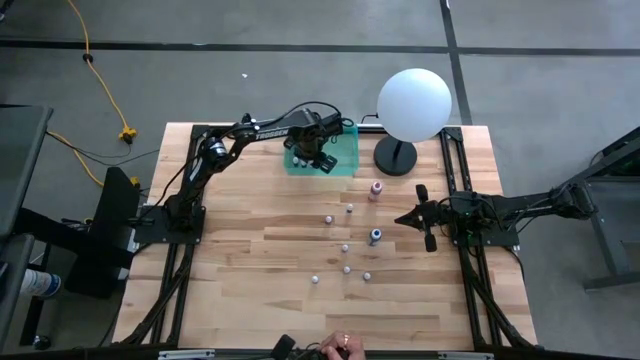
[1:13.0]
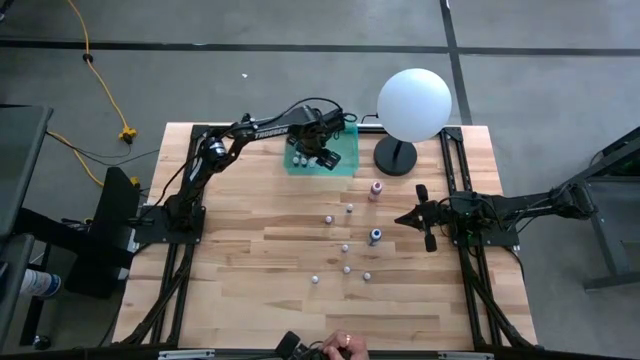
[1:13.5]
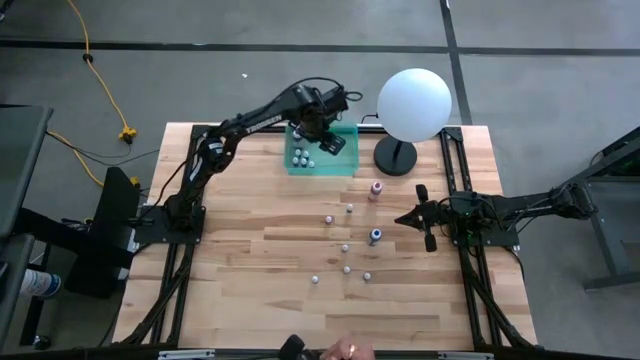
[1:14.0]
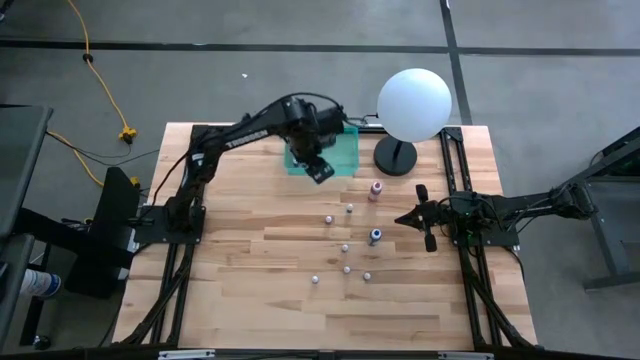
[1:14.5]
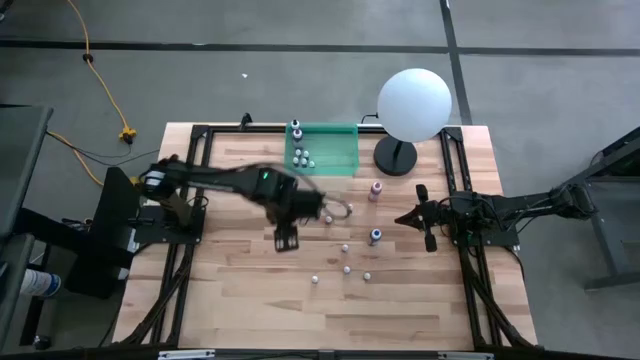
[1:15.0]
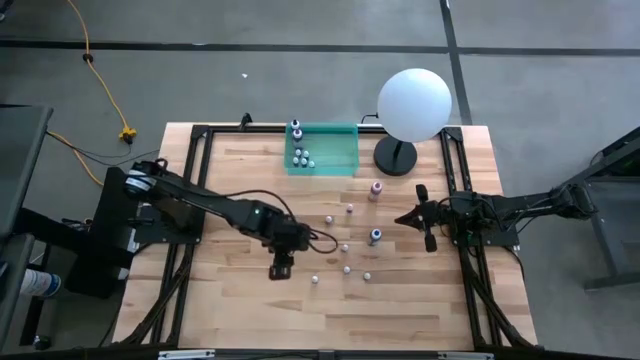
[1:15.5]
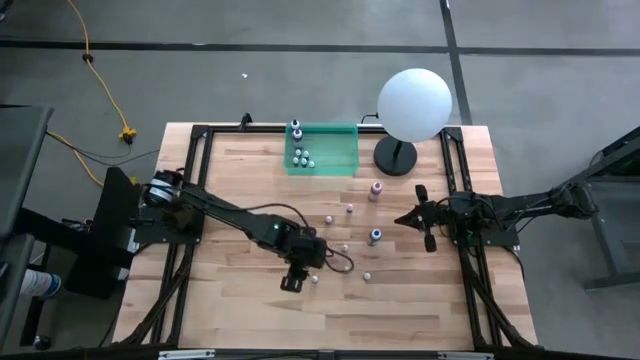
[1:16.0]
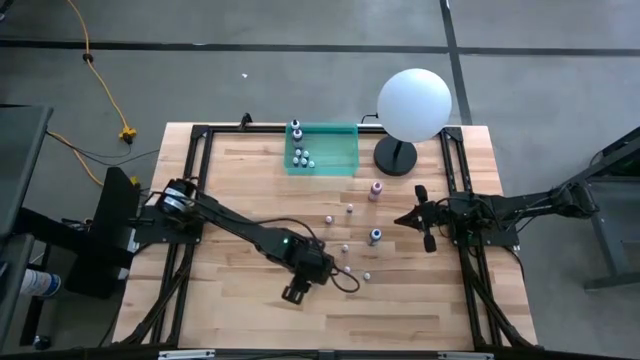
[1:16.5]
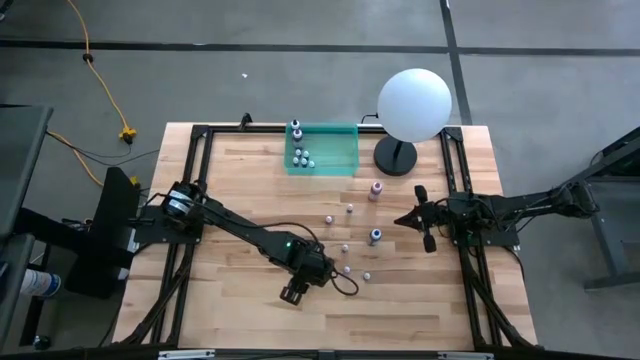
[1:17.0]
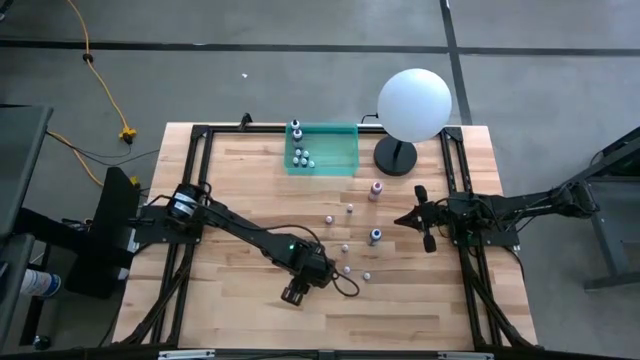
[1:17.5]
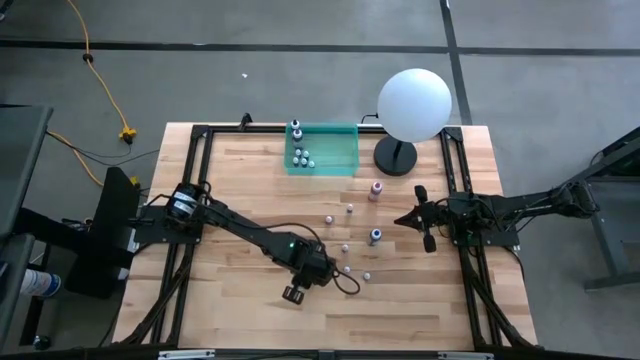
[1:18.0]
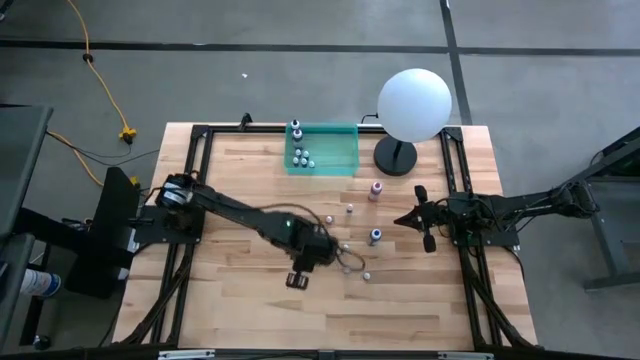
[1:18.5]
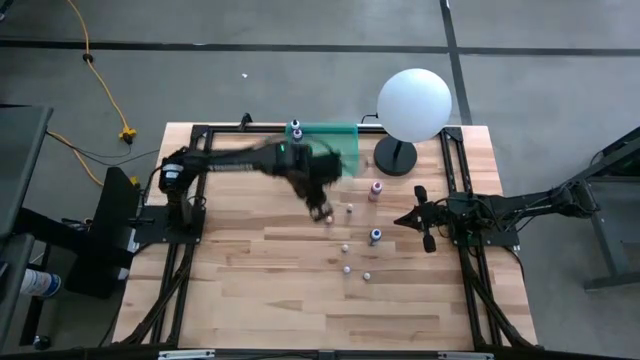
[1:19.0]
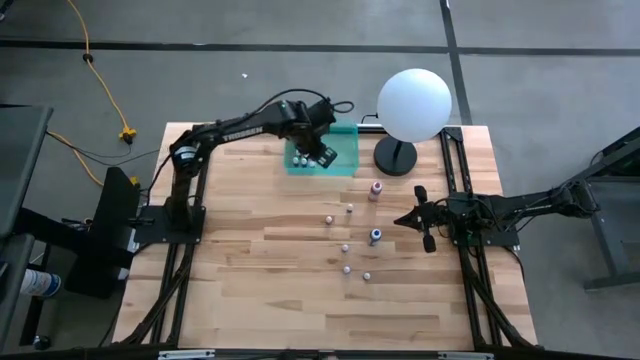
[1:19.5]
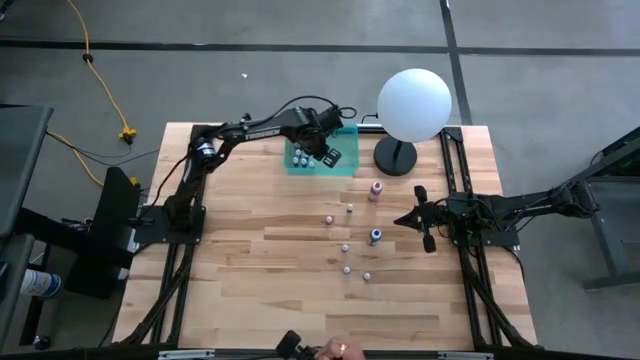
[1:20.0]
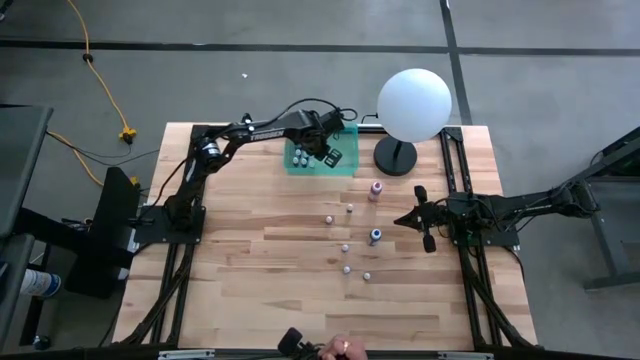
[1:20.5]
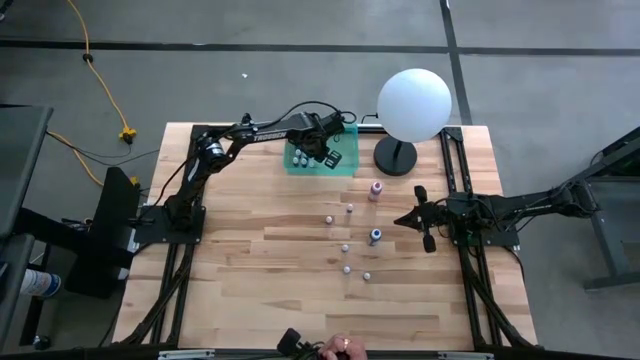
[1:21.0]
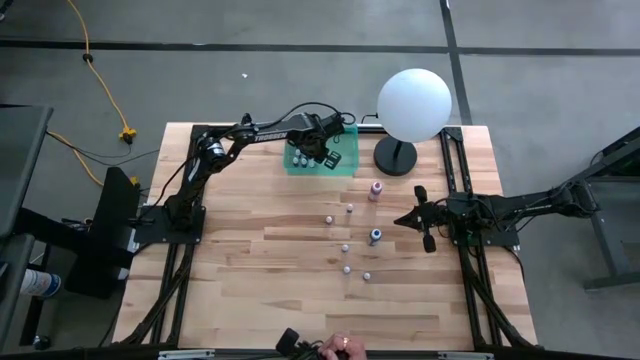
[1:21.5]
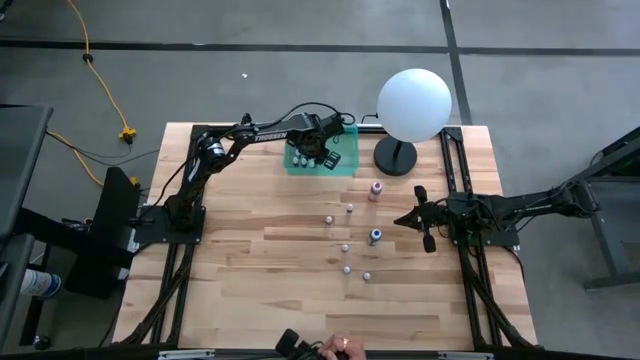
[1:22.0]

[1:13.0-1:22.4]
Task: Pick & Place food coloring
Put the small brown food coloring bottle into the bin

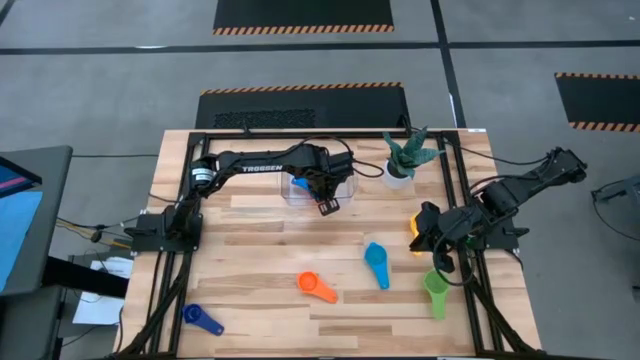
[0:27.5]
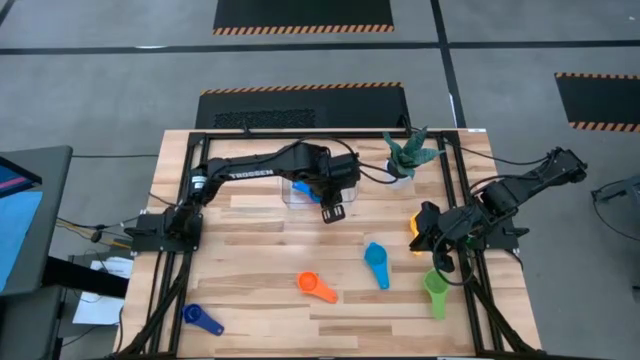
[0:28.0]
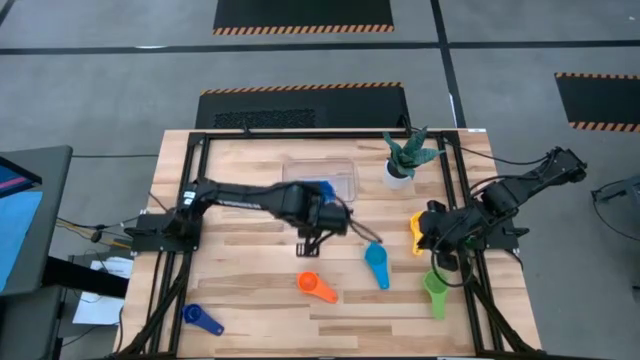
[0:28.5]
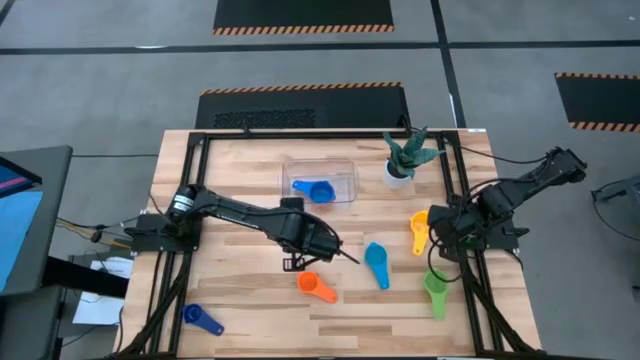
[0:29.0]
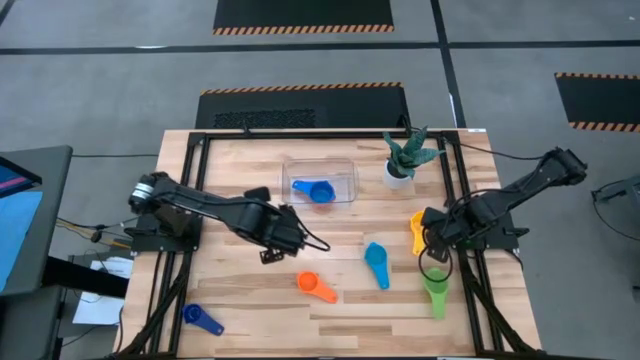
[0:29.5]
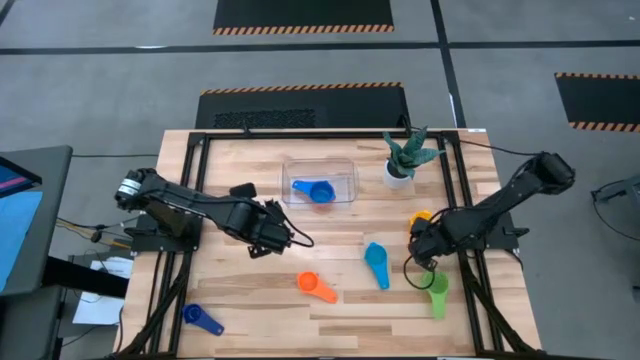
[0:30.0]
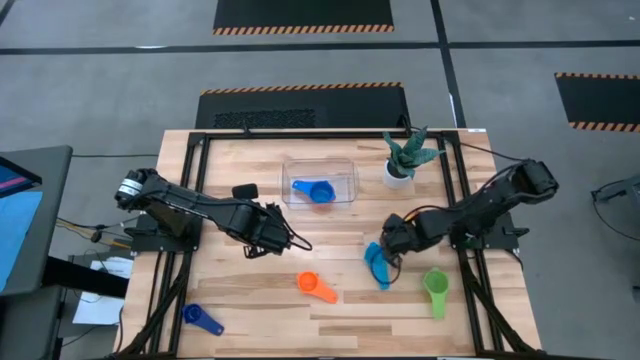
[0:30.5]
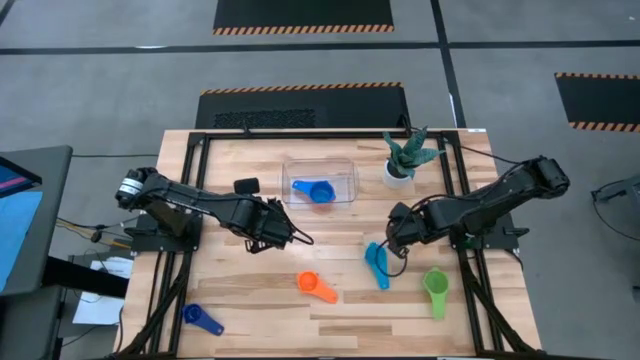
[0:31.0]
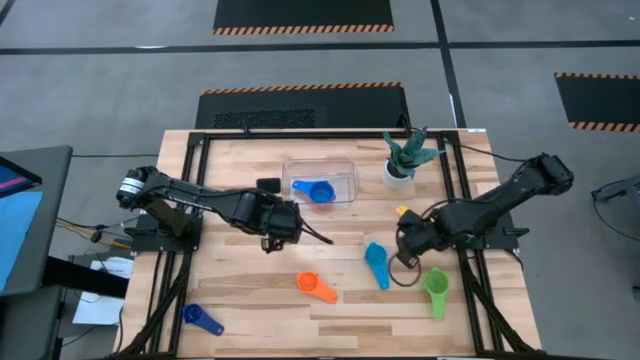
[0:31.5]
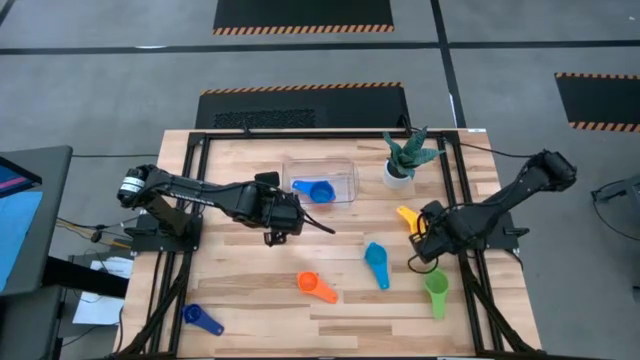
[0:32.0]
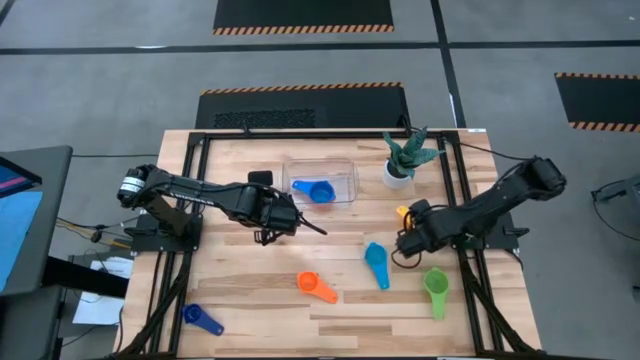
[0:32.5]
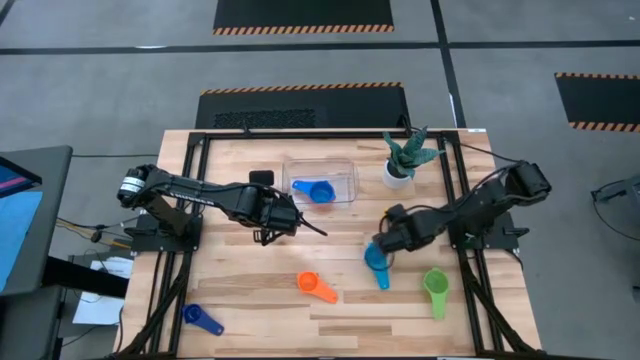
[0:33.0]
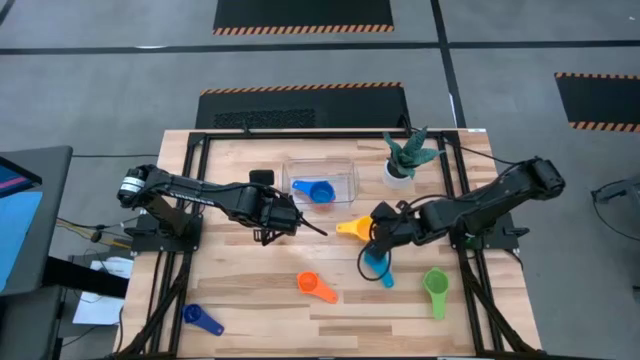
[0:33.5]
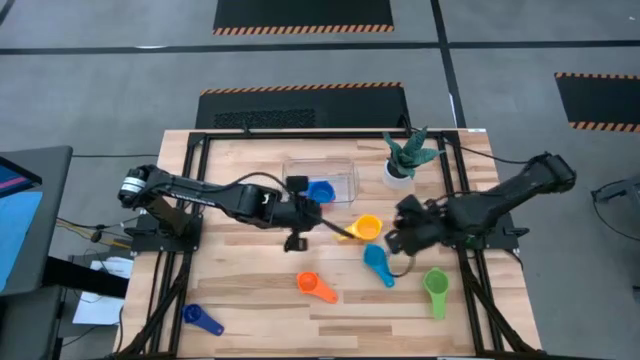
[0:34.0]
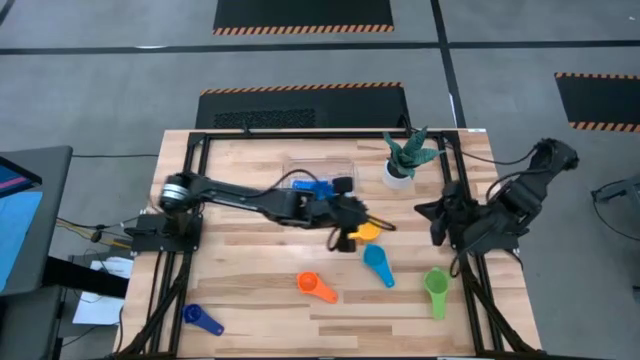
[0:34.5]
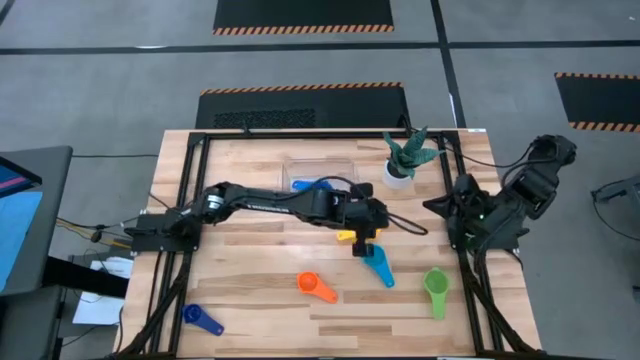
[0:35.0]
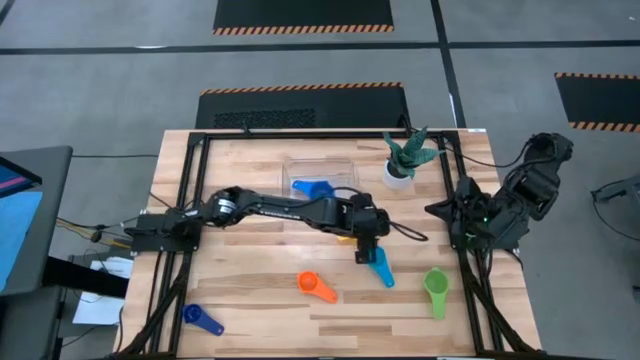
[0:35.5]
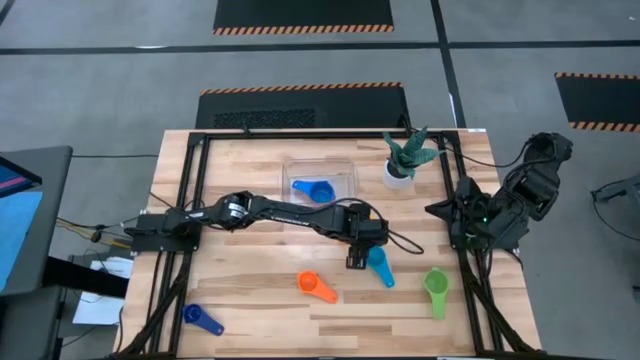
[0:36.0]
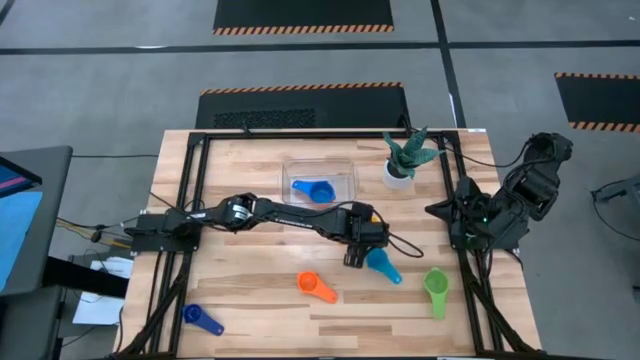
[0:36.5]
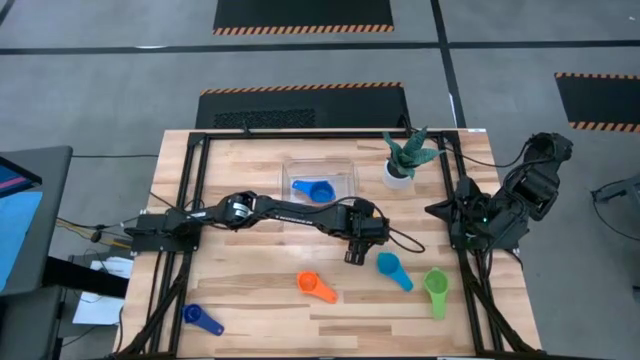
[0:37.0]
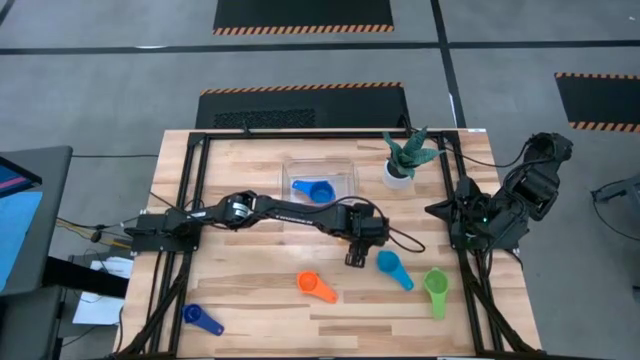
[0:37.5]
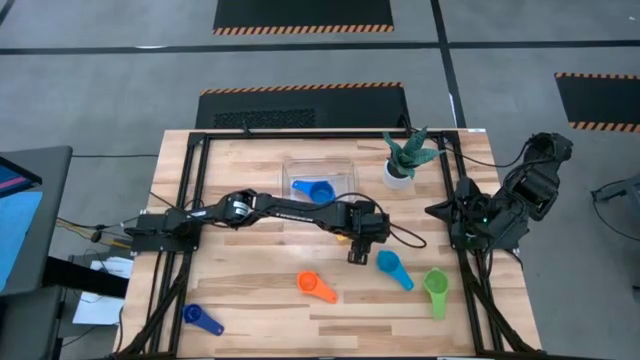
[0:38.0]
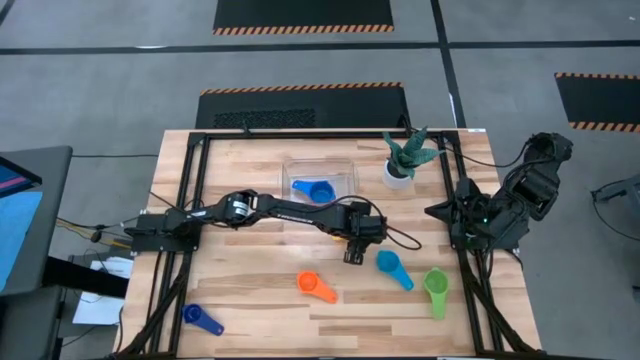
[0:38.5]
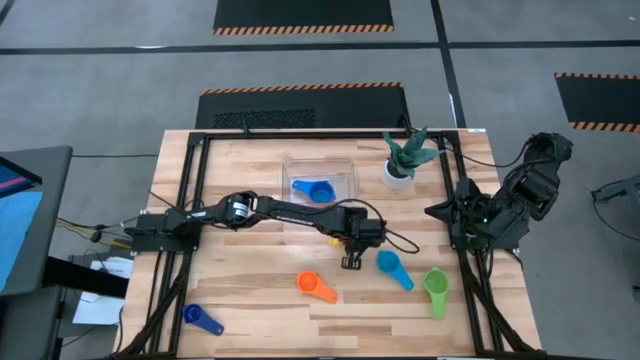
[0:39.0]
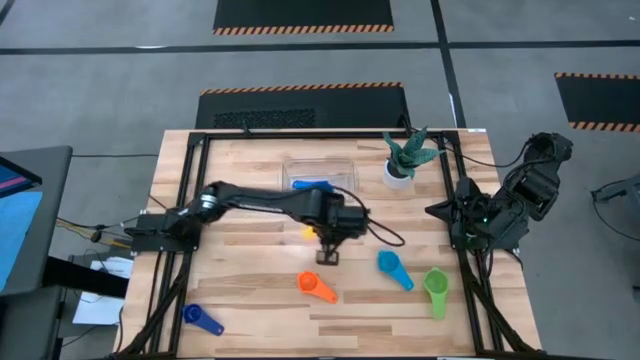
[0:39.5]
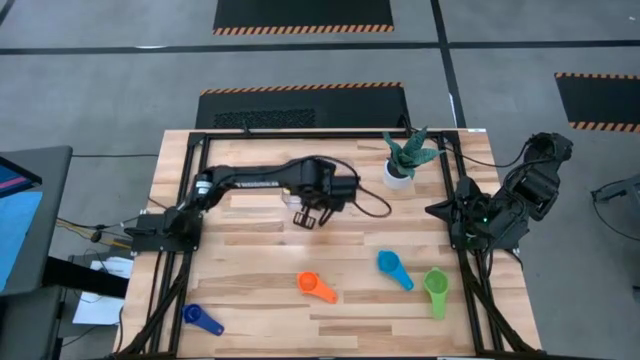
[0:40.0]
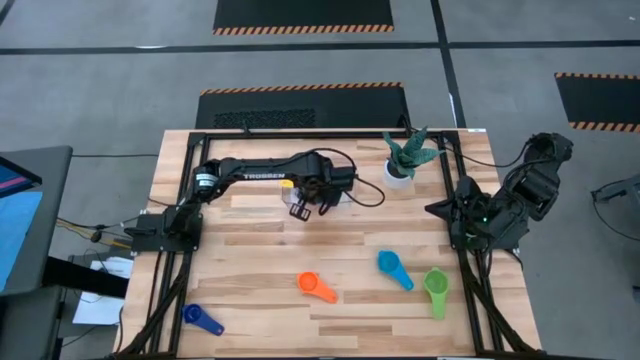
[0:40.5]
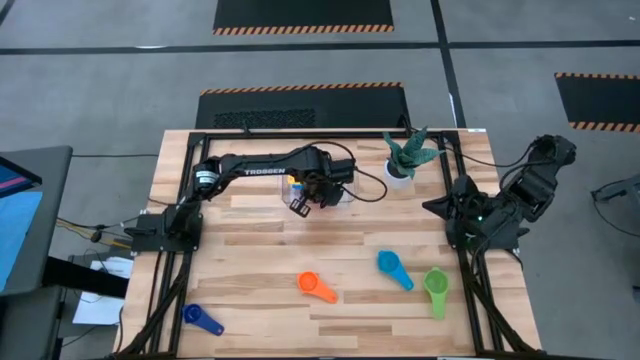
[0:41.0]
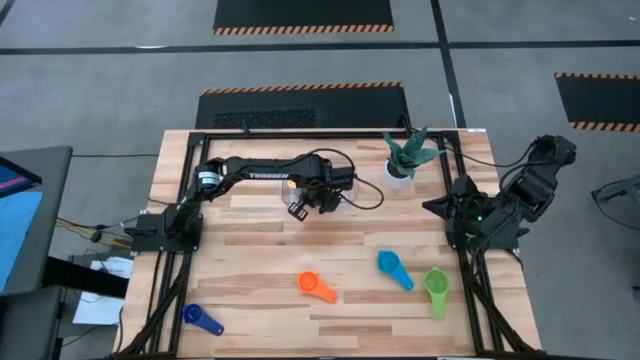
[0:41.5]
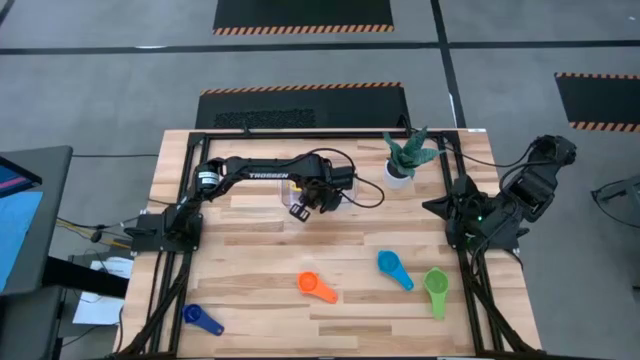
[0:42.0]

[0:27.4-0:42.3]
Task: Nest measuring cups in basket
Stack the yellow measuring cup on top of the blue measuring cup in the transparent bin
